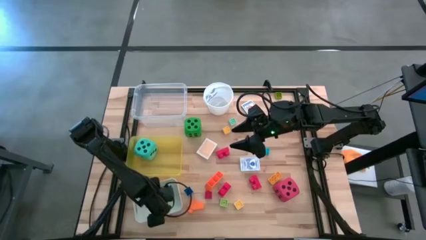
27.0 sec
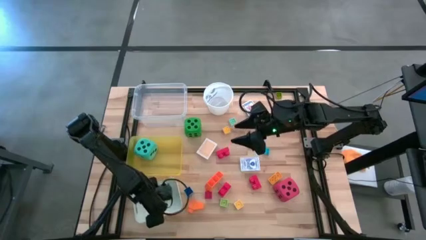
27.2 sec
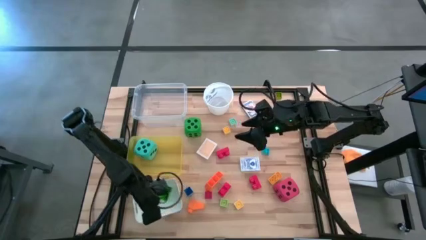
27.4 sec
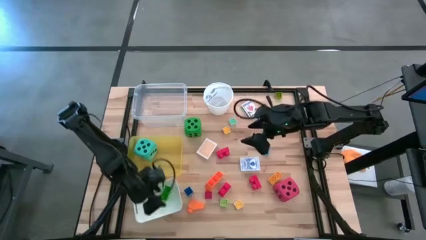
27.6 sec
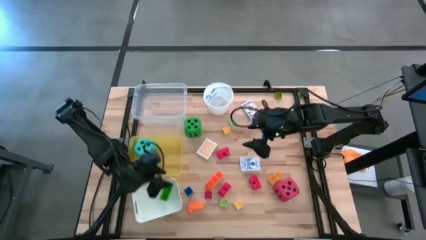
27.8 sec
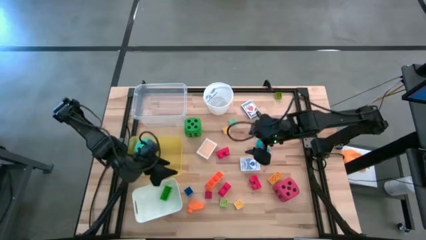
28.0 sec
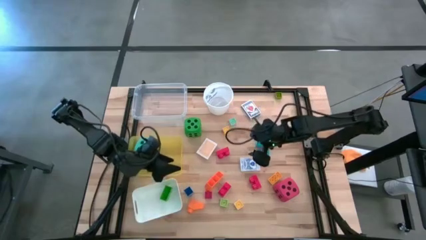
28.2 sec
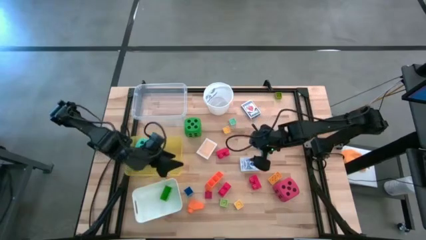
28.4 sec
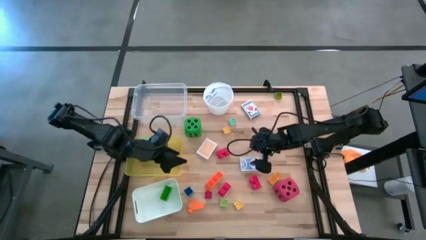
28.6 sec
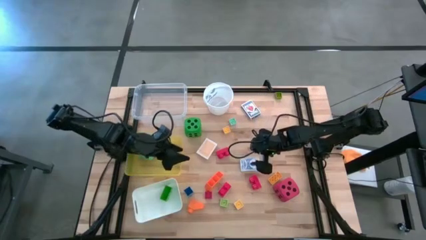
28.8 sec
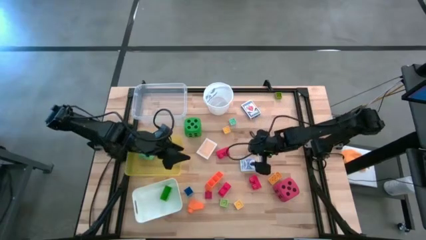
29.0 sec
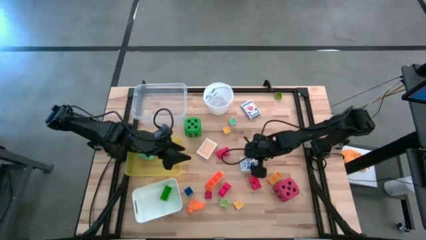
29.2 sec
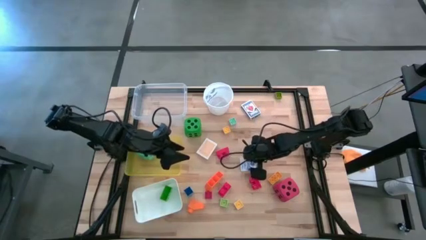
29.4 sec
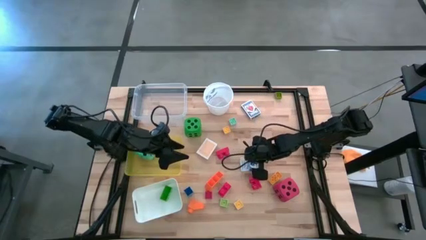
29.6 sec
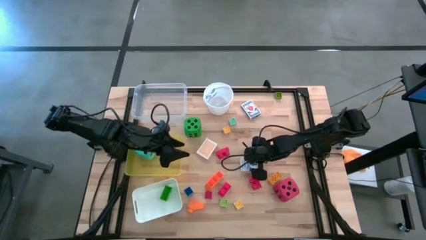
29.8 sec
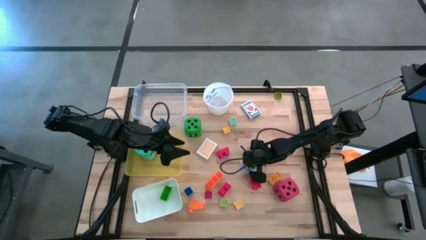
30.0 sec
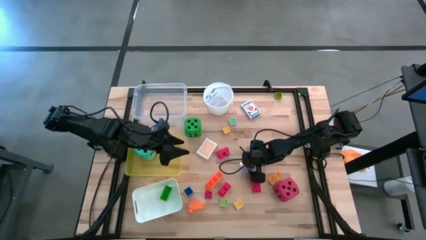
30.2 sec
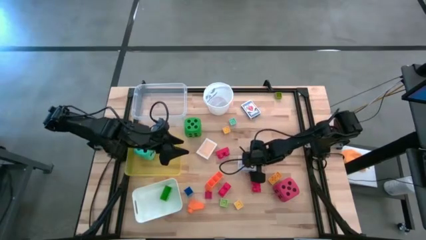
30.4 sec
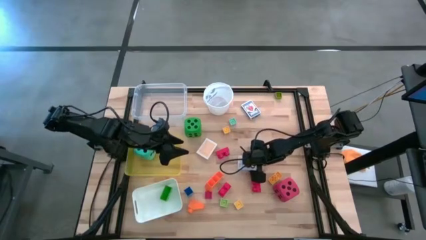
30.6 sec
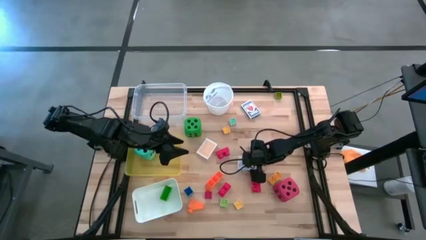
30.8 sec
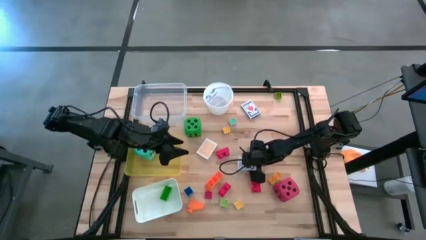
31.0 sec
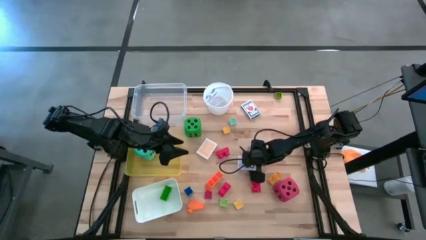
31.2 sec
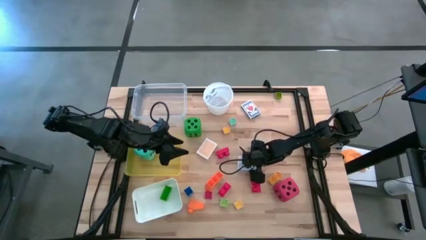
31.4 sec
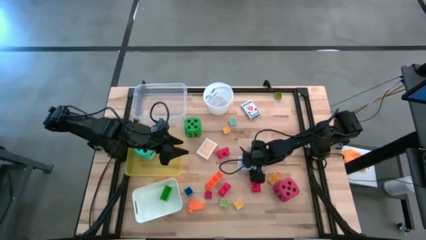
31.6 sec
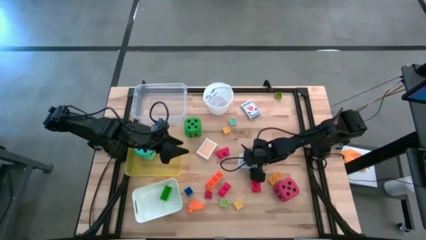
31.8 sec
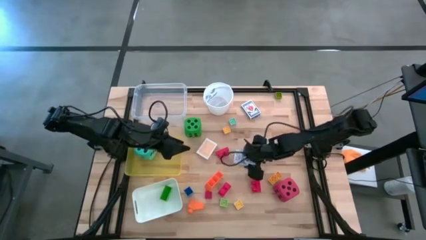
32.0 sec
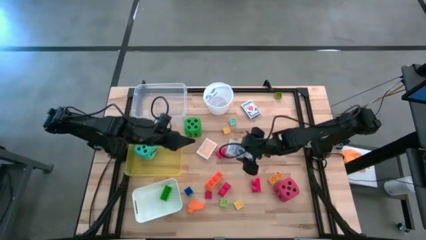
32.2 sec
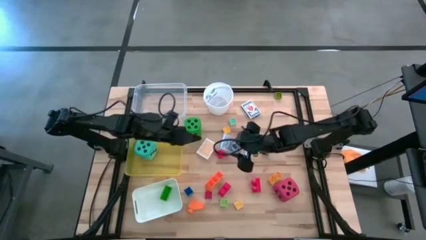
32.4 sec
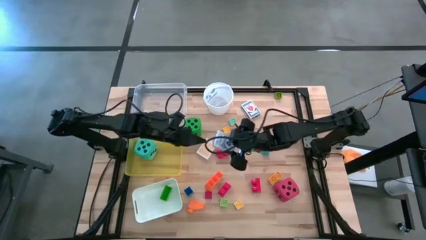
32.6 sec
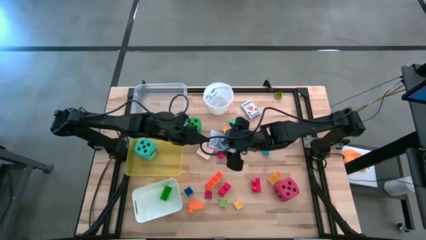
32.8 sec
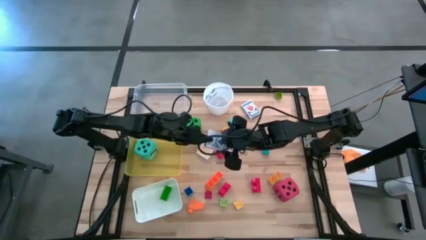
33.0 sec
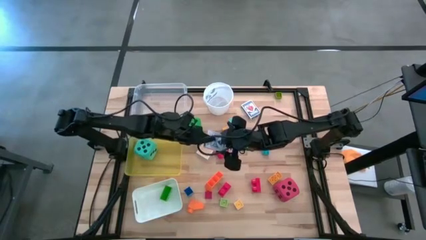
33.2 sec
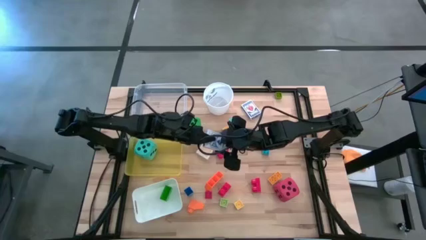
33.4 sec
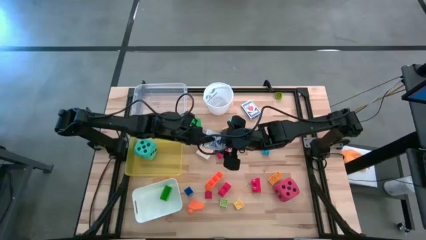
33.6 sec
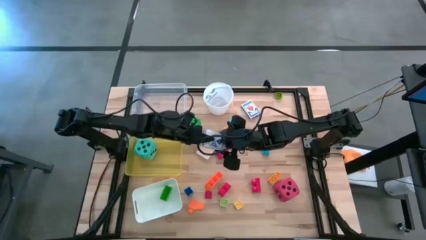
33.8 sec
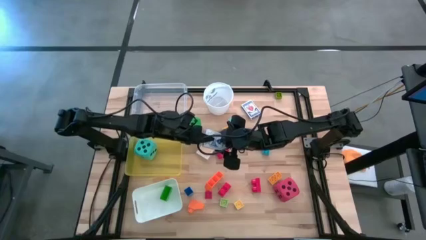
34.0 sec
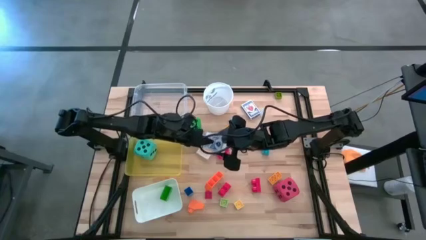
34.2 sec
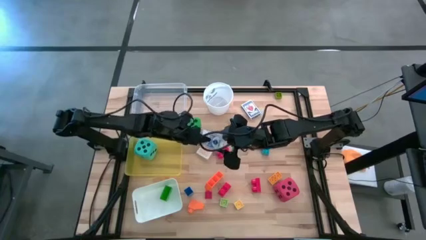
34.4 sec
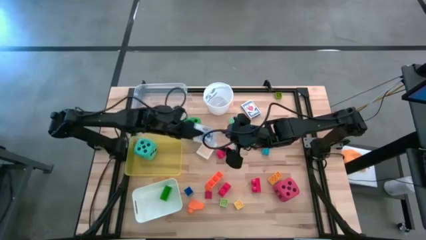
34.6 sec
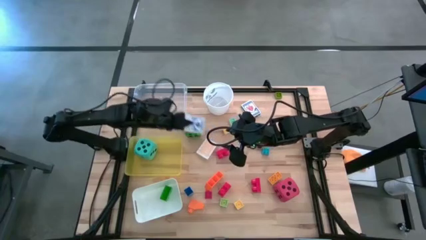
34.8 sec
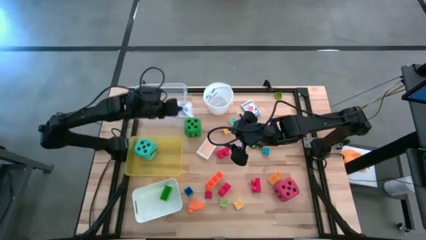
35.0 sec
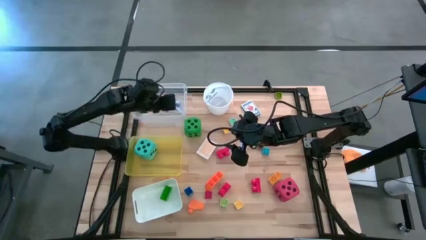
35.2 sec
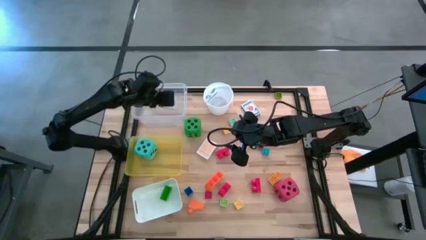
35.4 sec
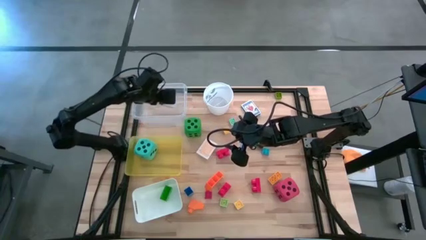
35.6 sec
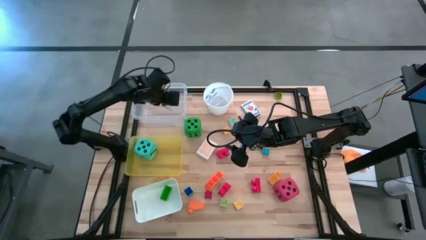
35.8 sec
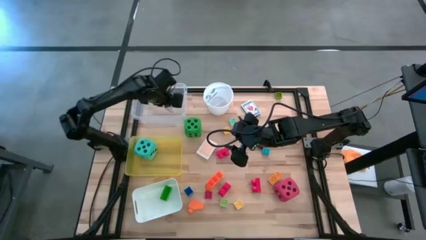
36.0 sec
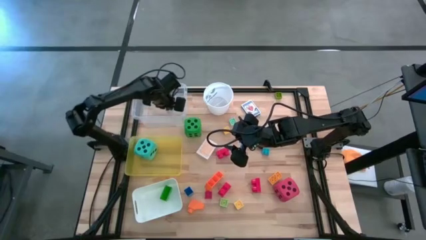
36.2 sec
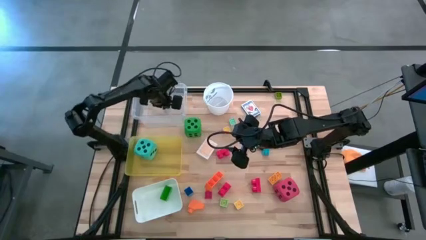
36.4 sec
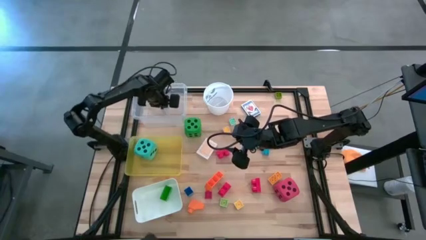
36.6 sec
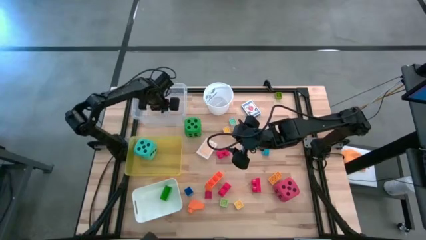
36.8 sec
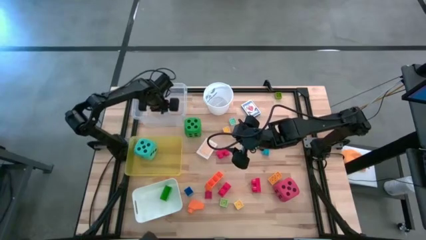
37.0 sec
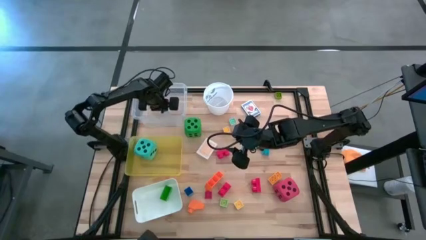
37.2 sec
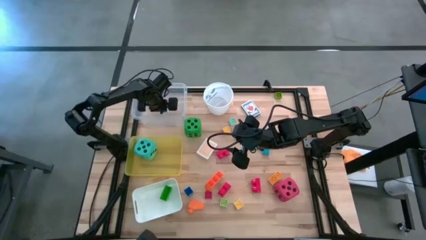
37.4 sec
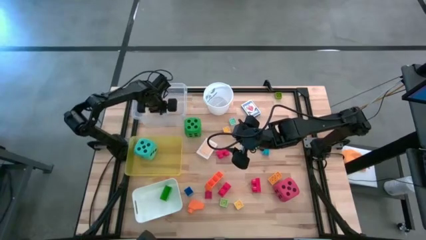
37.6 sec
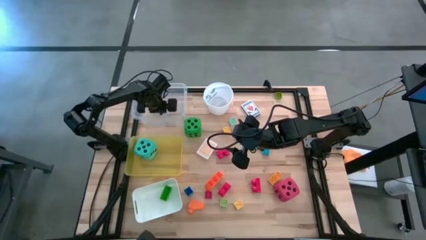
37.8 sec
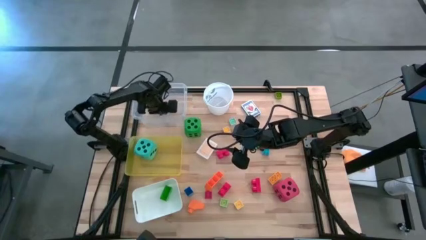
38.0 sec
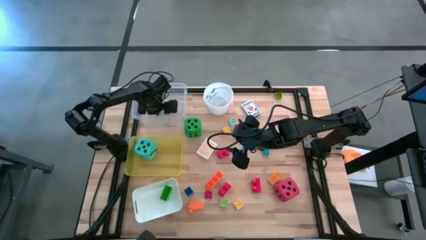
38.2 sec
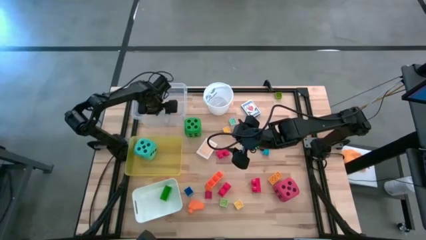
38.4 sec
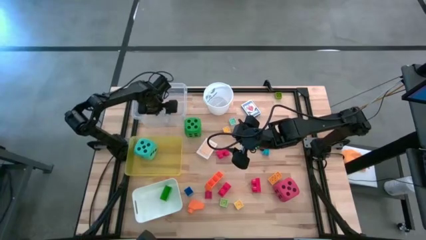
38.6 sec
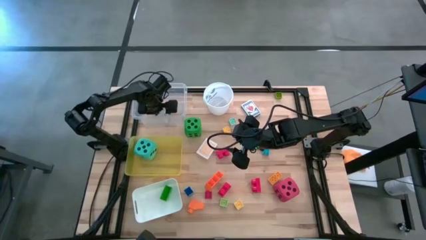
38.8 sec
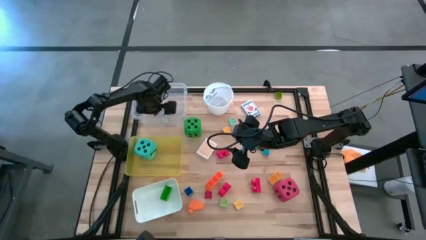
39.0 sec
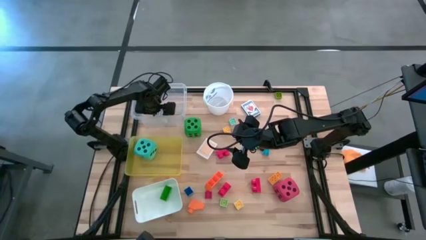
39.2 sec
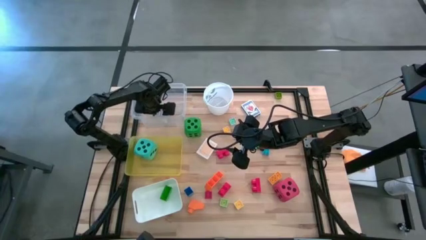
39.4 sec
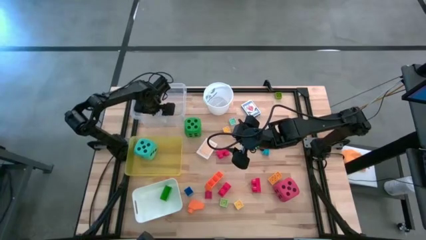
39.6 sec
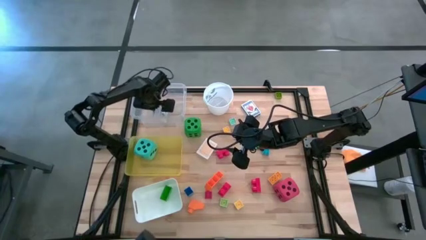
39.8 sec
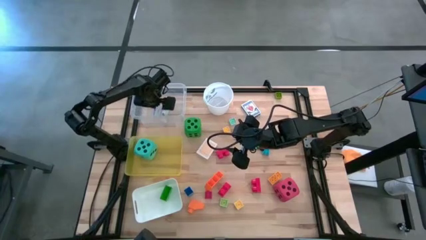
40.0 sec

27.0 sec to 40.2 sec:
Task: Pick & Place Toys
Put the blue deck of cards into the transparent bin

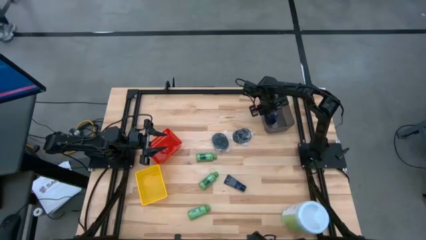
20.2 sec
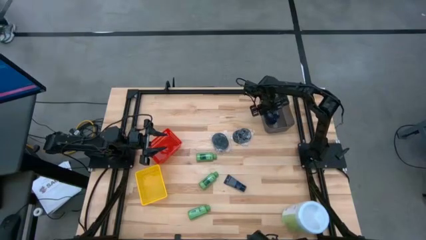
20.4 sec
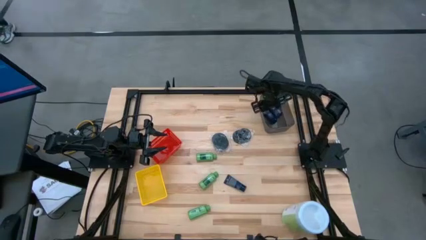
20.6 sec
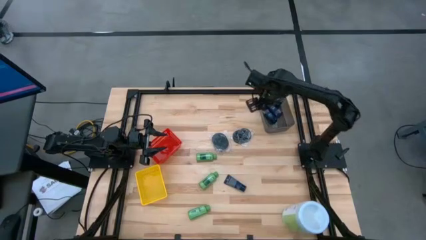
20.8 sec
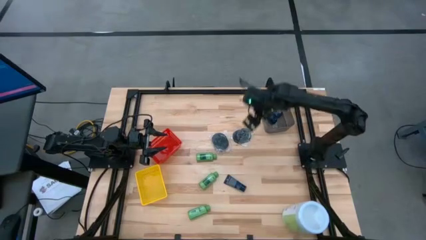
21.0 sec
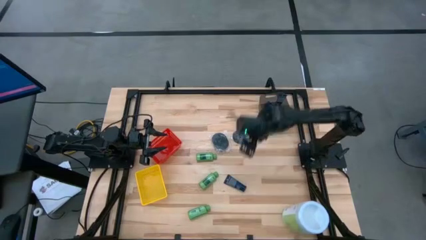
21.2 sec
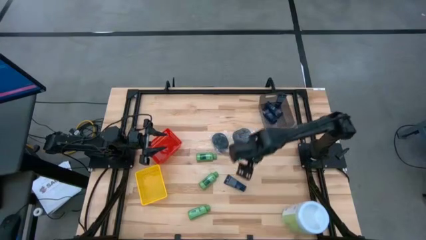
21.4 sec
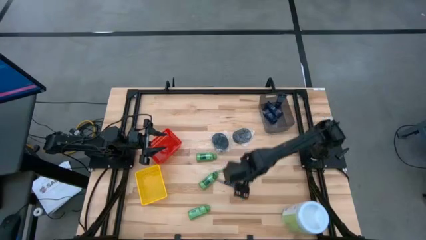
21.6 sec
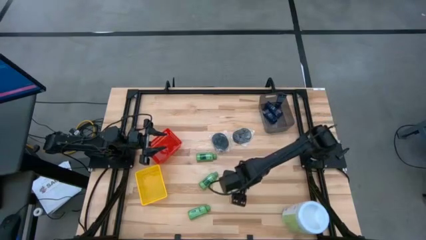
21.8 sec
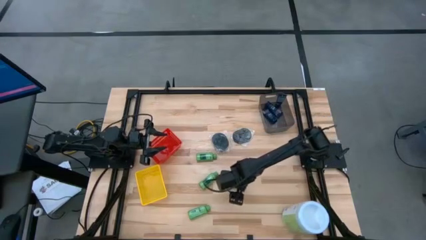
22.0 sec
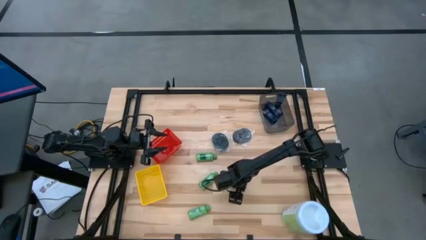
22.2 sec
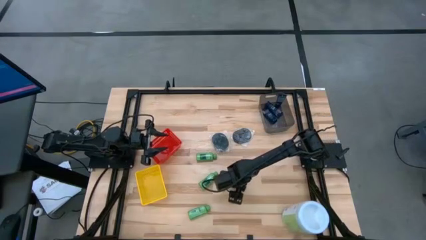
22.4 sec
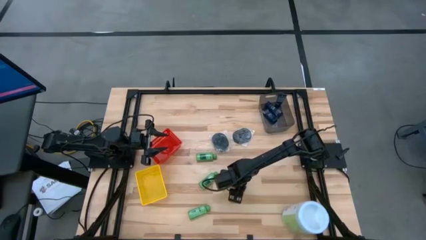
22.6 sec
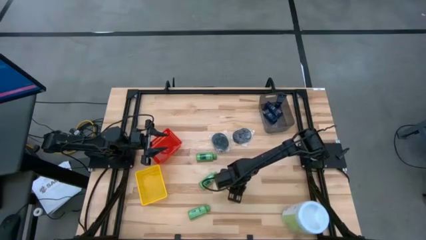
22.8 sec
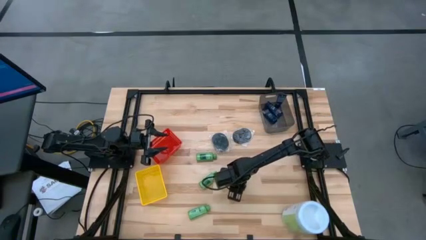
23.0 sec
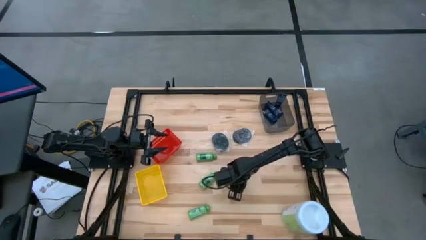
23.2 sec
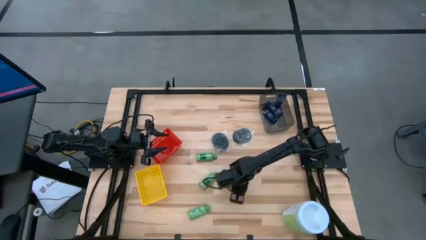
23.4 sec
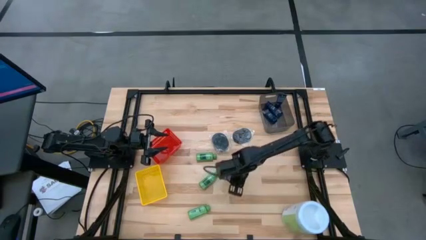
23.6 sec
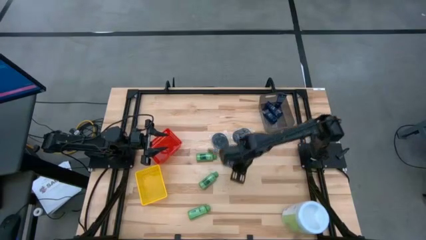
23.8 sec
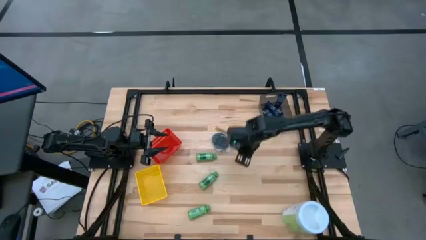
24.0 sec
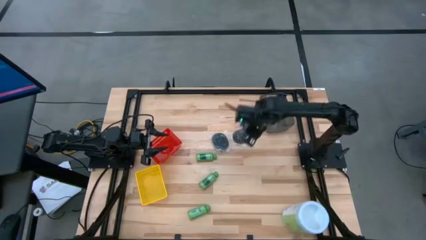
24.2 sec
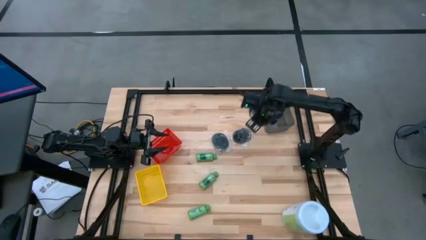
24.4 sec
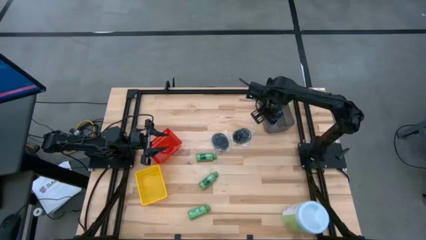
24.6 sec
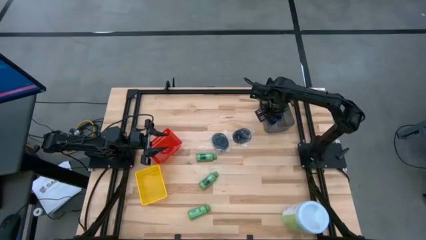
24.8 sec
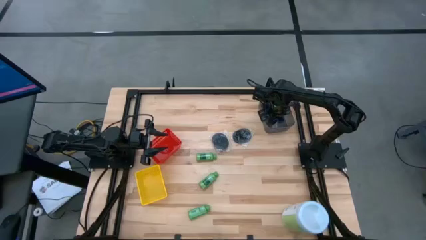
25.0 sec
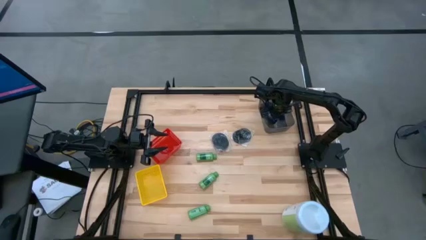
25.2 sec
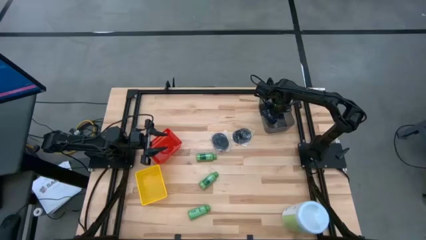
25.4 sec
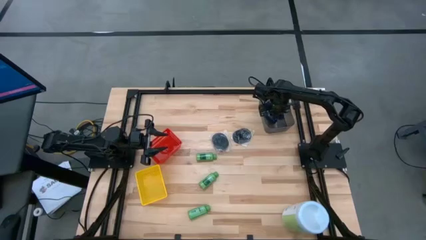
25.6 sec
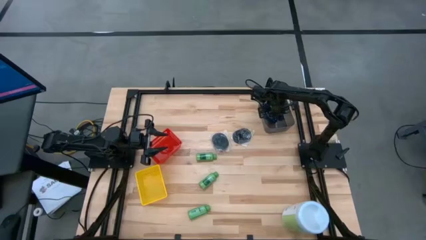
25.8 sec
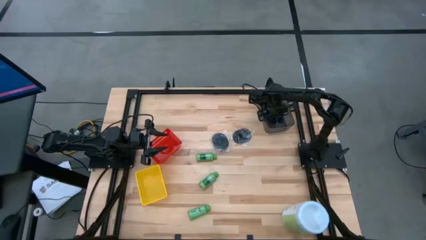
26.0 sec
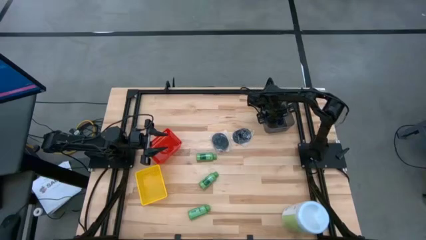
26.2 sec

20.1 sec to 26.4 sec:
Task: Pick & Place Travel size toiletries
Put the shaving cream into the gray bin
